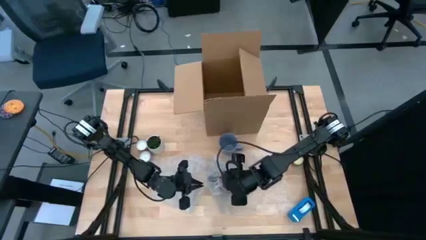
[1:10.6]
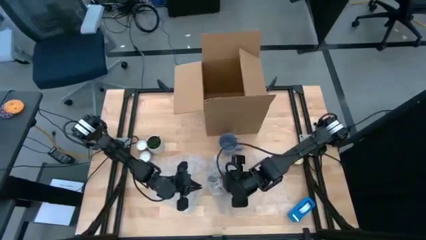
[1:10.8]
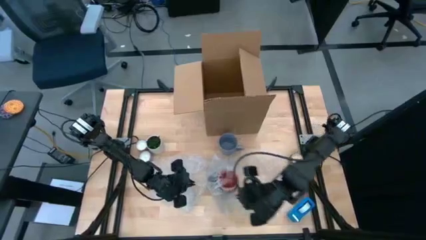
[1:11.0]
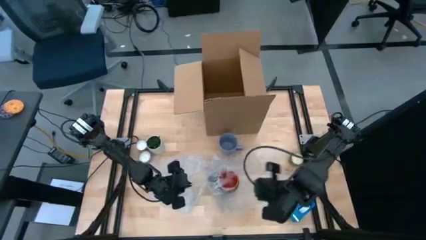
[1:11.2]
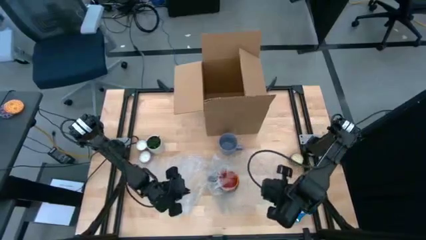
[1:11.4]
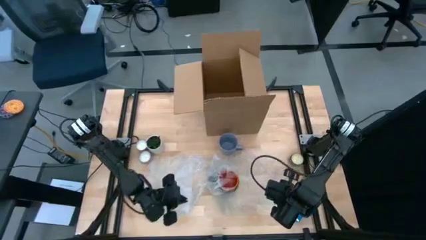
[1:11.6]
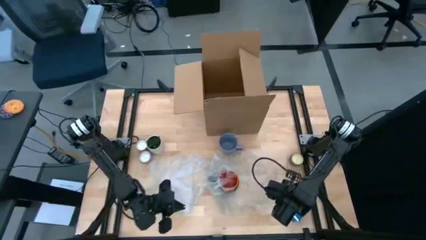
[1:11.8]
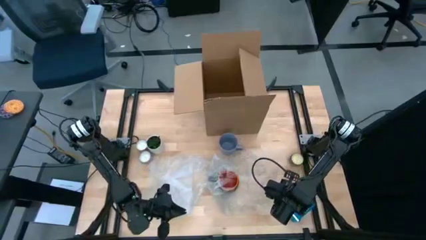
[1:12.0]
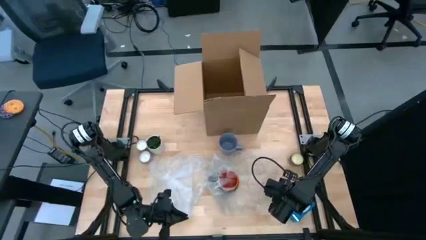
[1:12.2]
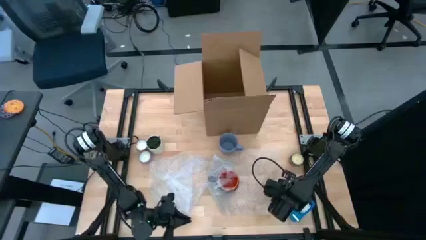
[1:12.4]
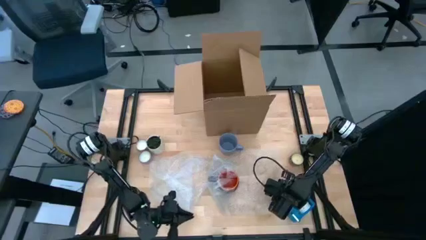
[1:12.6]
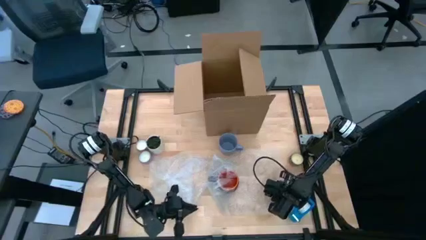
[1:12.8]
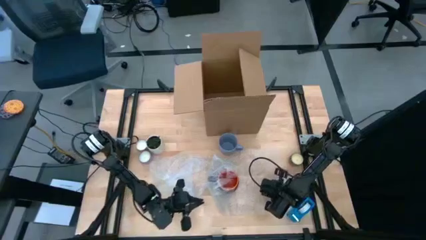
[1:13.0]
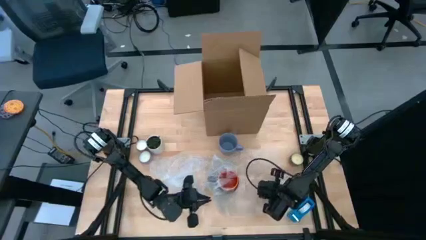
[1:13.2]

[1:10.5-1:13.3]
Task: wrap mug
Wrap the black mug with the top bubble wrap

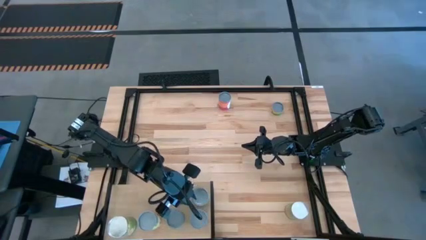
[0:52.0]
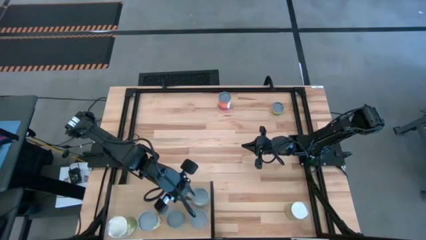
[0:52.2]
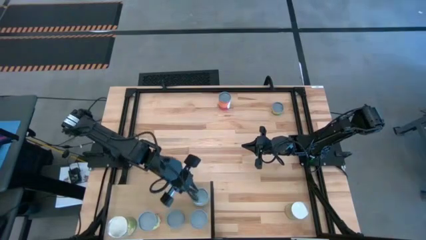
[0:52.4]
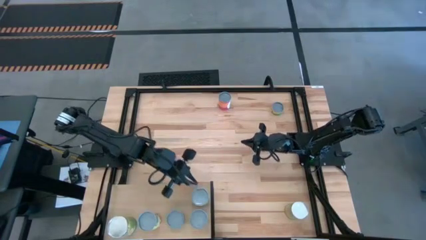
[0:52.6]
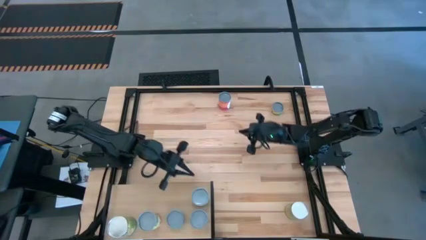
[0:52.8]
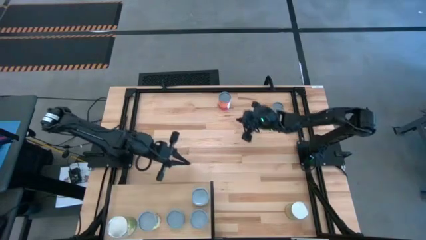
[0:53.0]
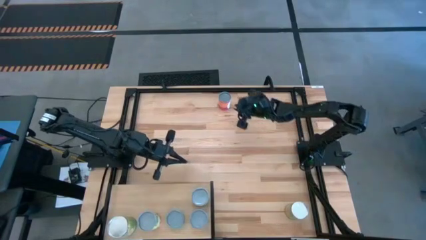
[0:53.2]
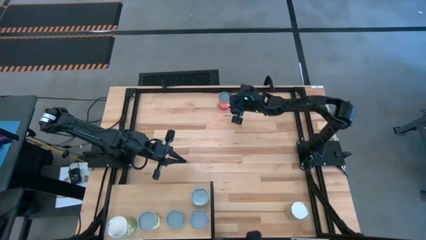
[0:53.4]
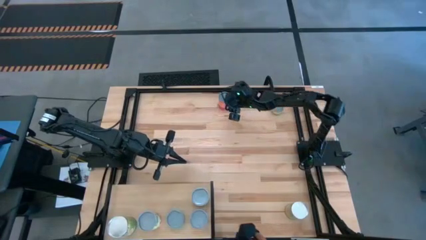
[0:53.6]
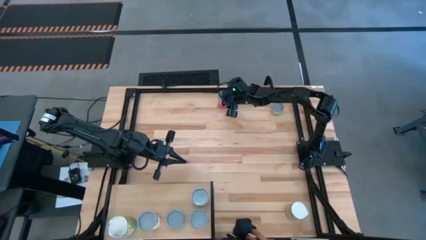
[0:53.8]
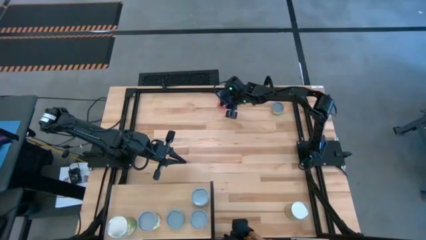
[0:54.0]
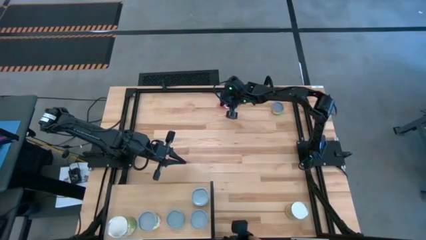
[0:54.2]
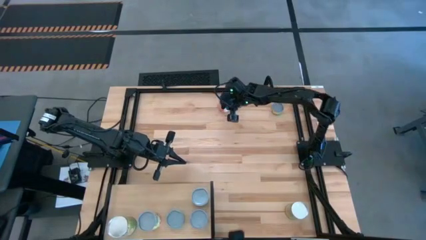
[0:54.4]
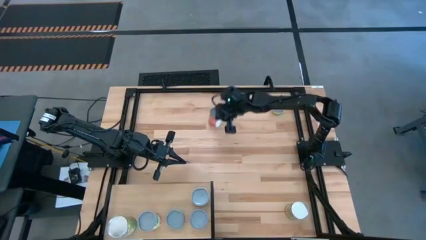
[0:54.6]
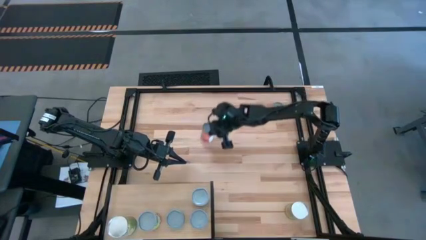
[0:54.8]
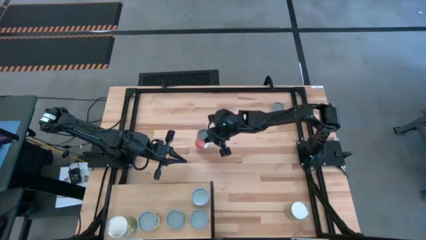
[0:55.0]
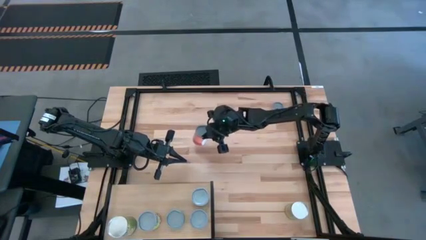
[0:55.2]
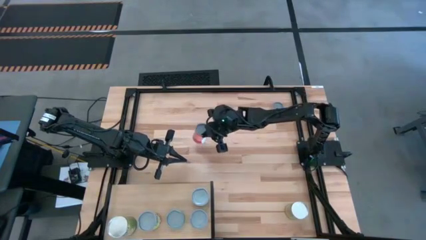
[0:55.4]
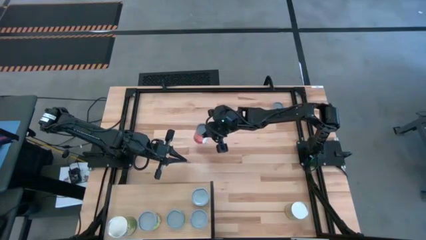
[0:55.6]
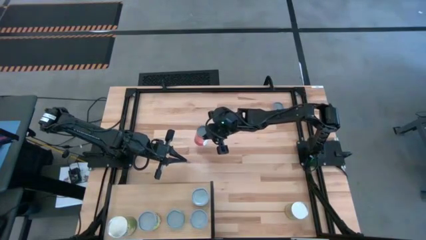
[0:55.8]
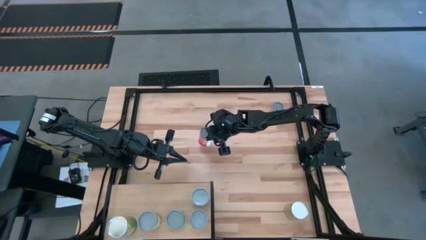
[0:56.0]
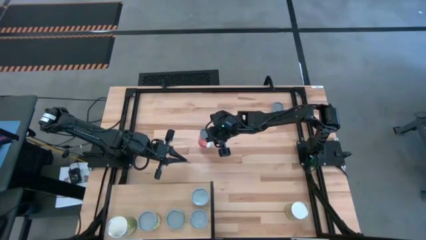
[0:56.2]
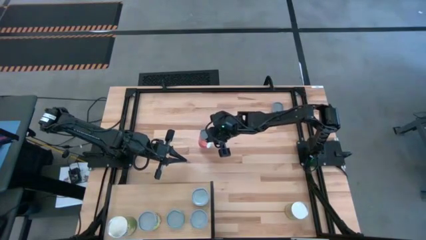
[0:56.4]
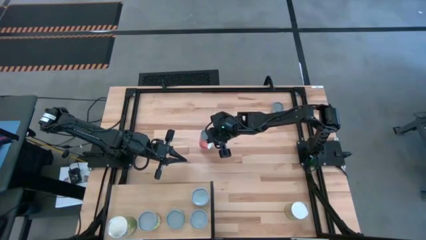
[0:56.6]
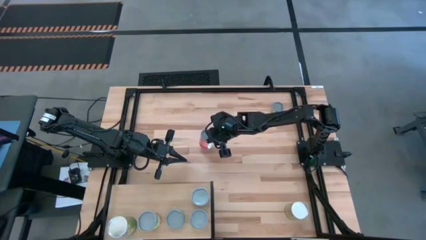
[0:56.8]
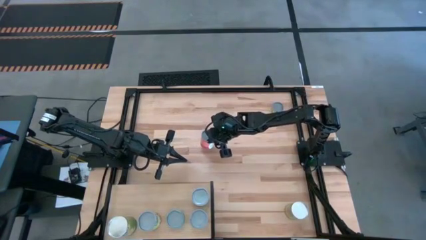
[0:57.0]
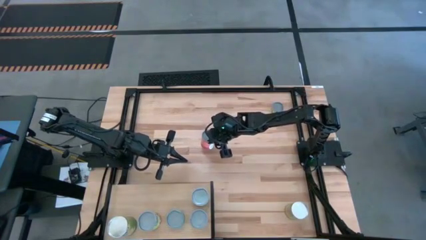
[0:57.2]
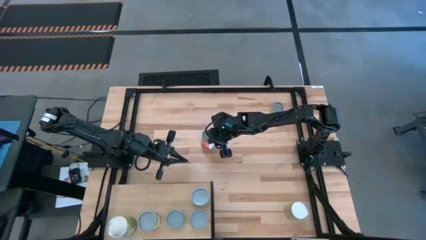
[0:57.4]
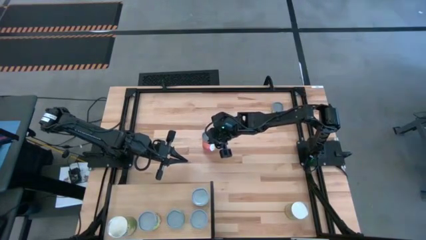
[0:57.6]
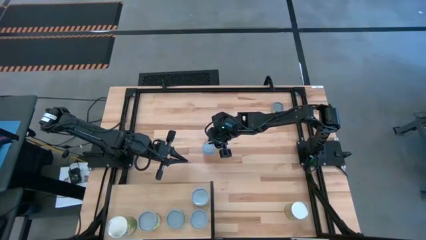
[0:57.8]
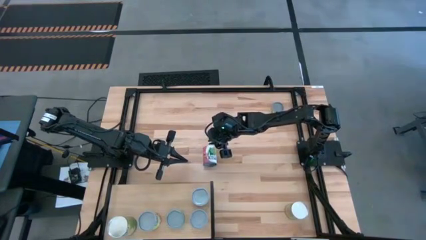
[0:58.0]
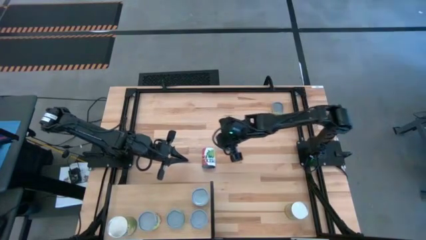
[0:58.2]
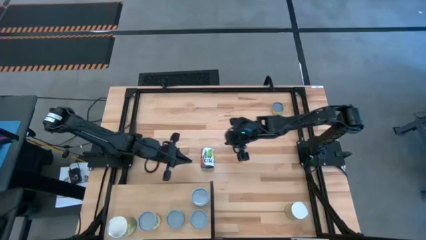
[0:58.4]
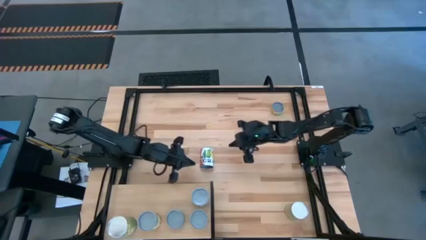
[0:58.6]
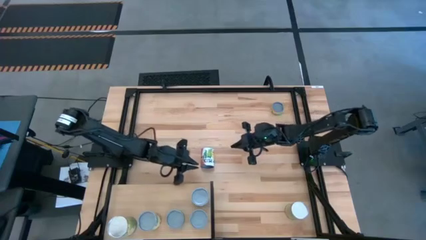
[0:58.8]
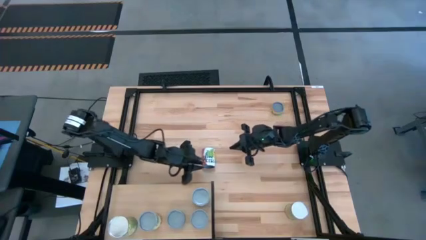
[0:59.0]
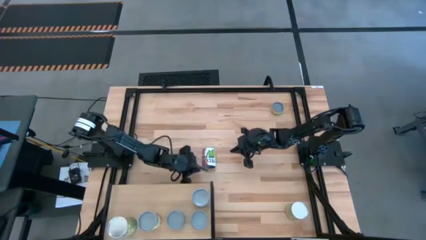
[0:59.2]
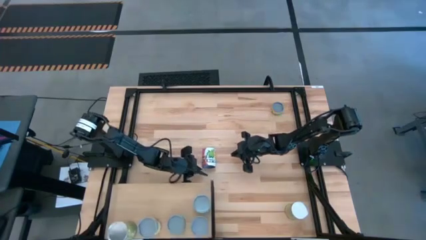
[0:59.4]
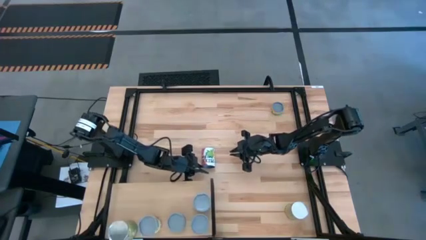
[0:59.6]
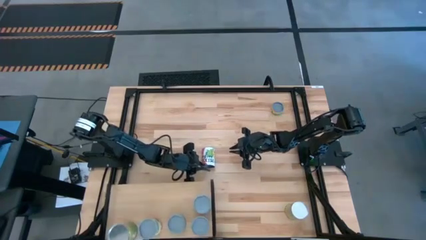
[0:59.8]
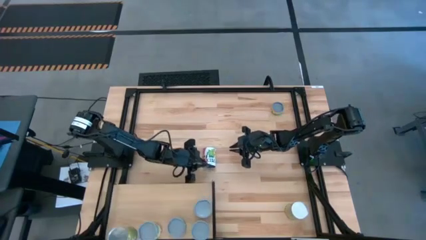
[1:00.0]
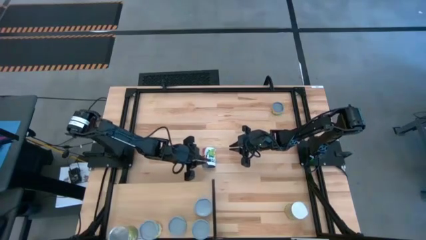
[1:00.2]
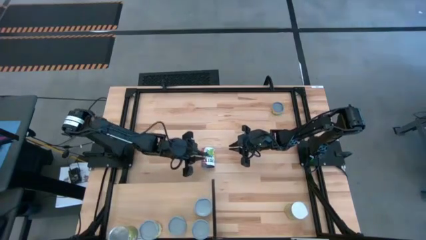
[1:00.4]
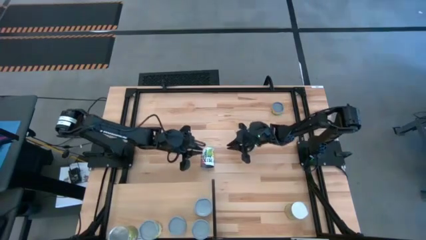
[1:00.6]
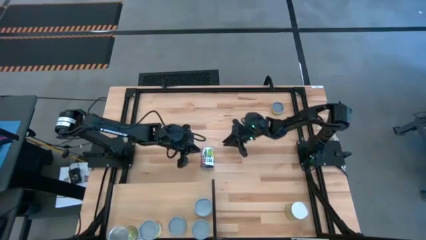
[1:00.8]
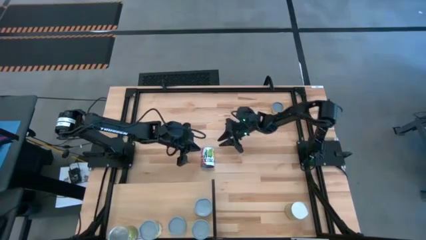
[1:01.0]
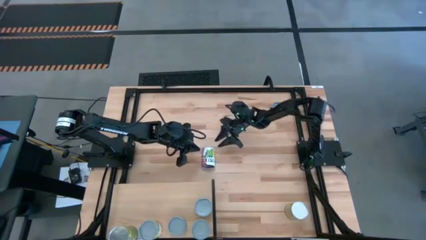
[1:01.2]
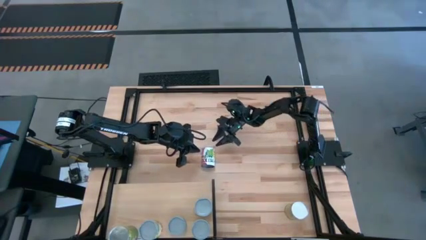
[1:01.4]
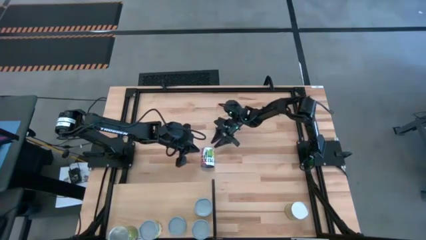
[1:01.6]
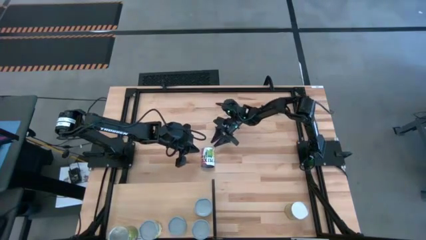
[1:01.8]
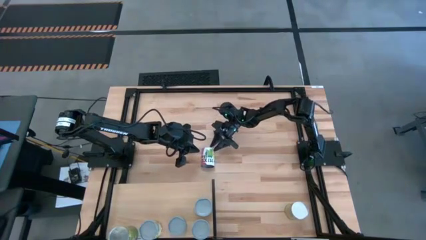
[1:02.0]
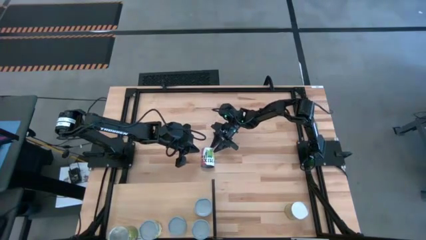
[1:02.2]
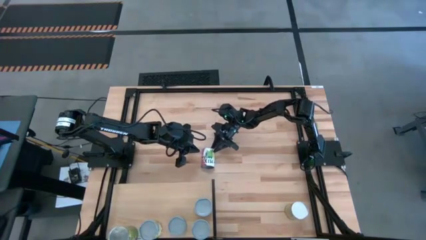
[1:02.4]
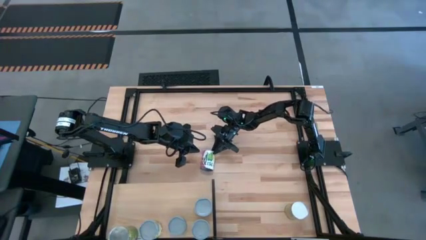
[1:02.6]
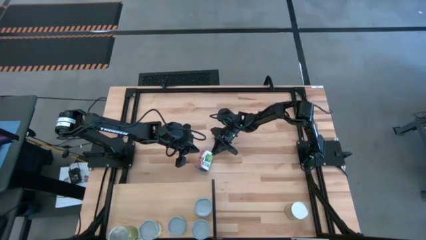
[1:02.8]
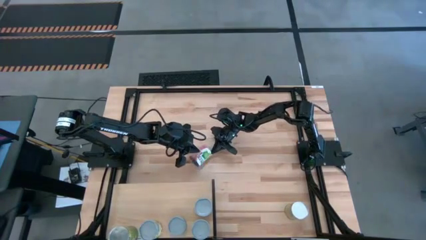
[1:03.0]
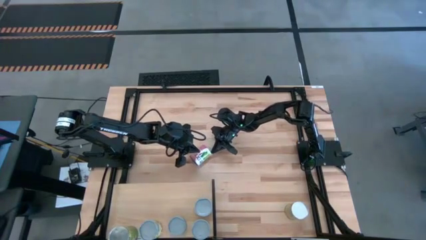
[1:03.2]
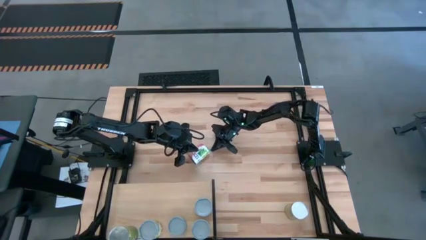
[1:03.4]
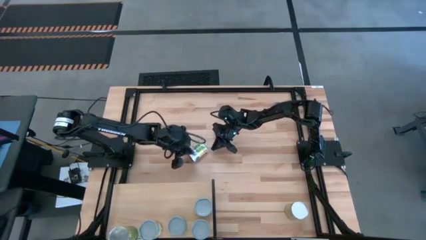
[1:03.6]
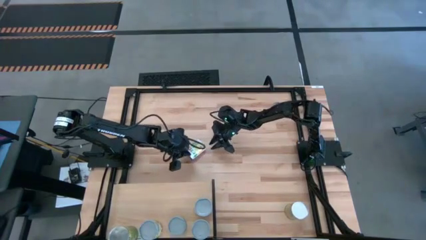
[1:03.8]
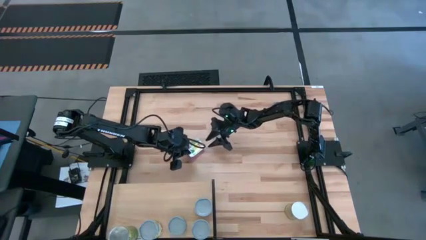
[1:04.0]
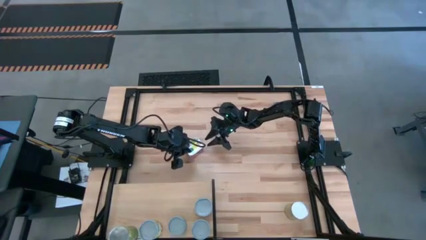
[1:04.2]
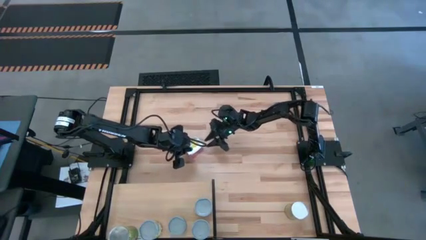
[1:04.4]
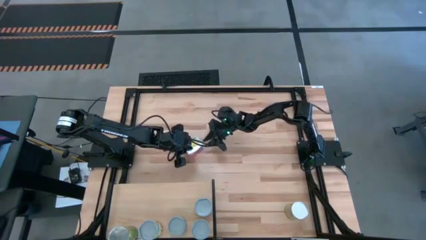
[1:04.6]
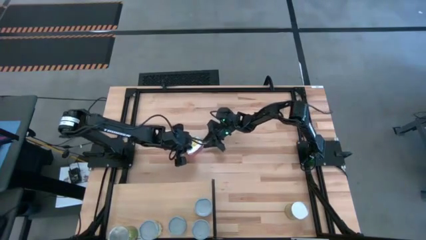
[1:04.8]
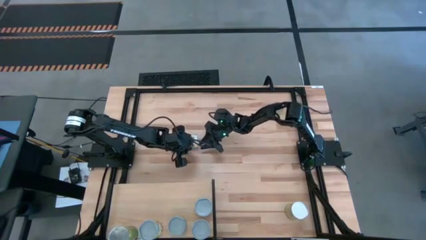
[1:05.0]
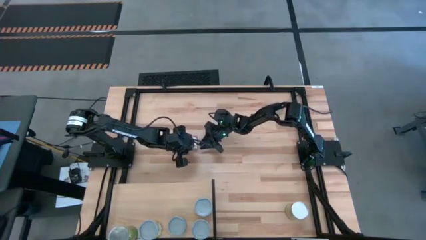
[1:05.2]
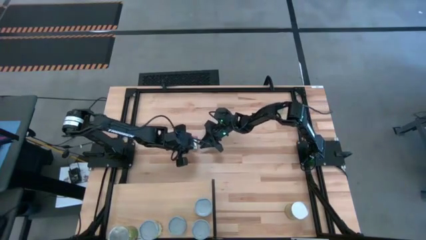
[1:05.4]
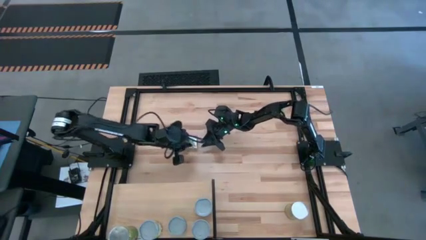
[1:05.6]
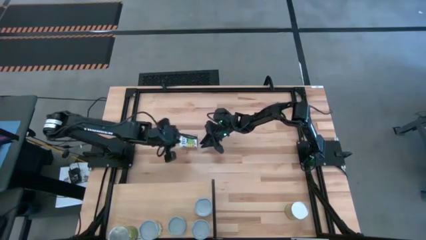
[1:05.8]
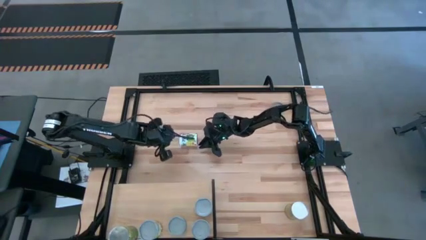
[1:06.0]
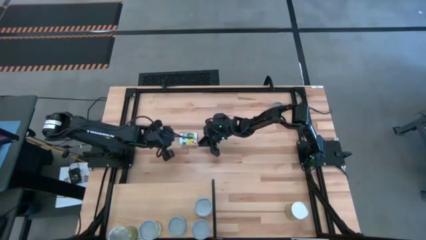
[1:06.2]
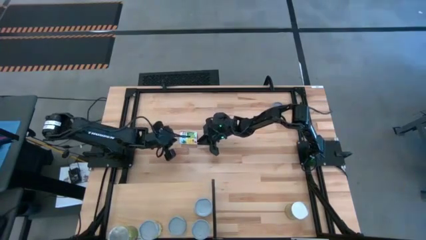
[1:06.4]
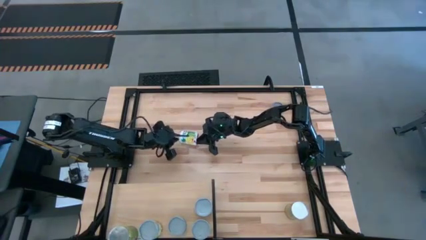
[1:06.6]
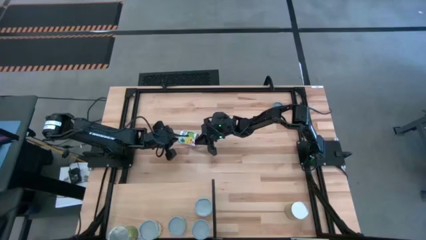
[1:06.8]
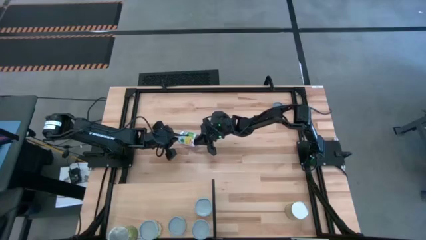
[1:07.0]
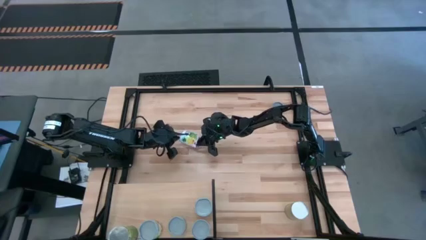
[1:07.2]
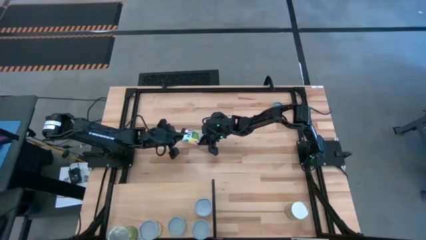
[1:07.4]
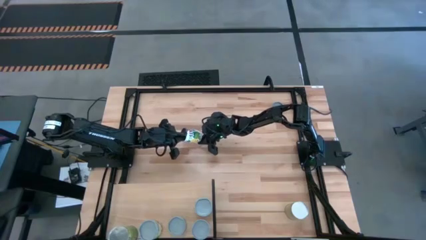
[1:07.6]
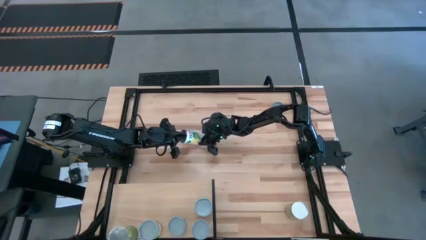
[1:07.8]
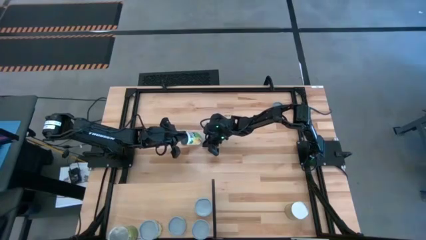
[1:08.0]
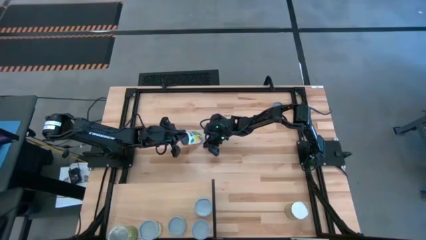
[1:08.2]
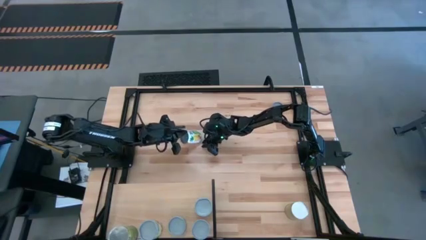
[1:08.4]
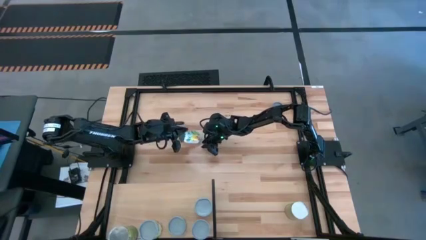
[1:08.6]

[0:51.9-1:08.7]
Task: Pick and place cans onto a shelf
Put the canned mixed fruit on the shelf
